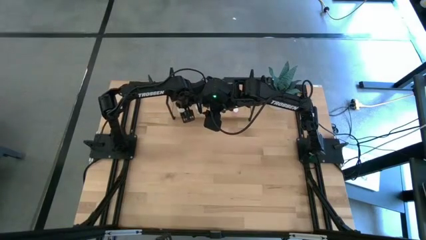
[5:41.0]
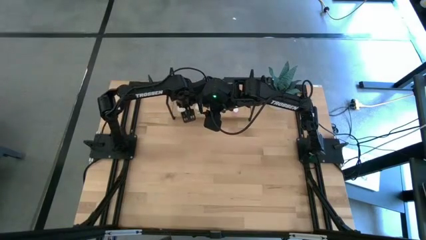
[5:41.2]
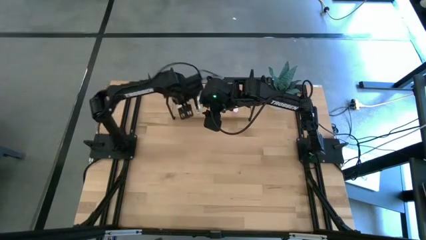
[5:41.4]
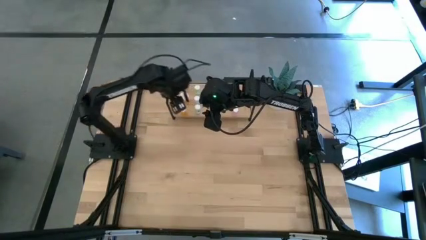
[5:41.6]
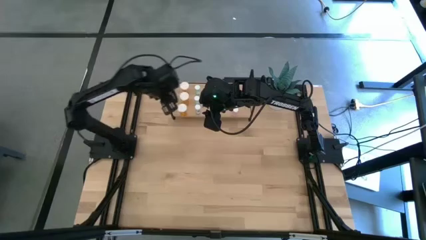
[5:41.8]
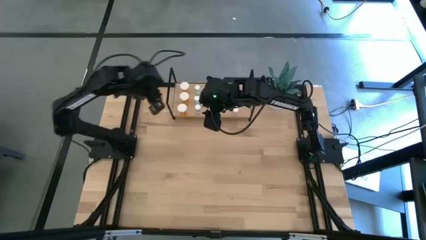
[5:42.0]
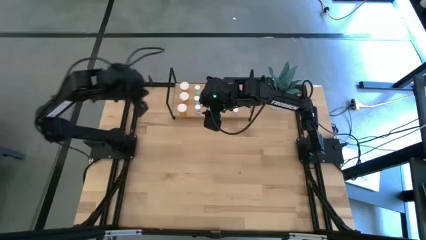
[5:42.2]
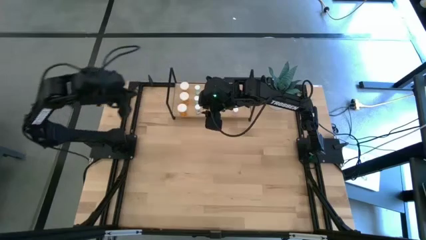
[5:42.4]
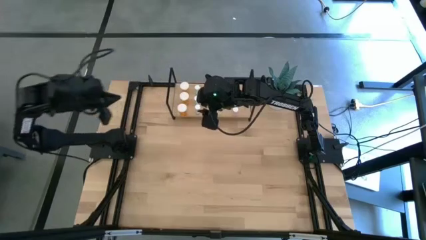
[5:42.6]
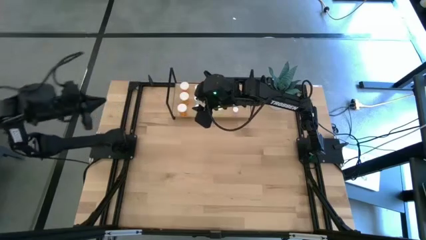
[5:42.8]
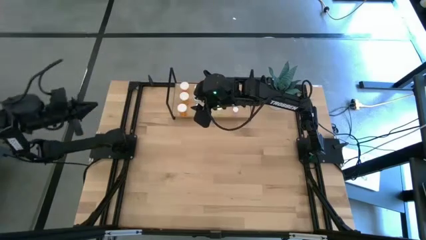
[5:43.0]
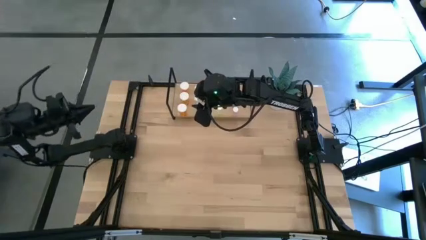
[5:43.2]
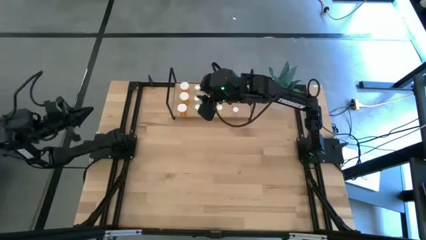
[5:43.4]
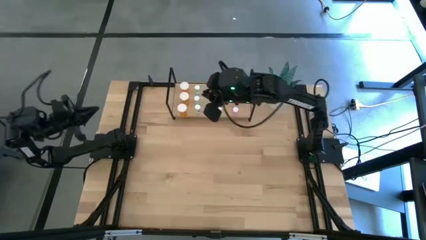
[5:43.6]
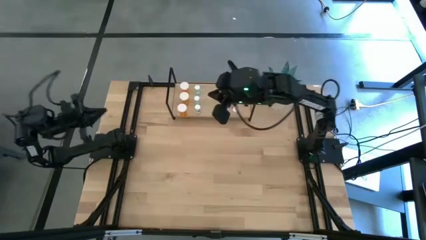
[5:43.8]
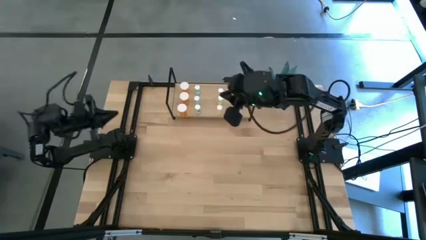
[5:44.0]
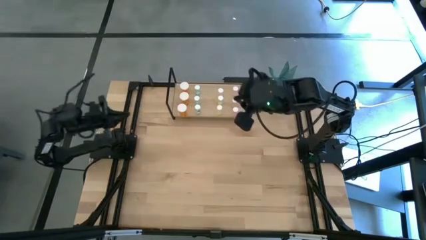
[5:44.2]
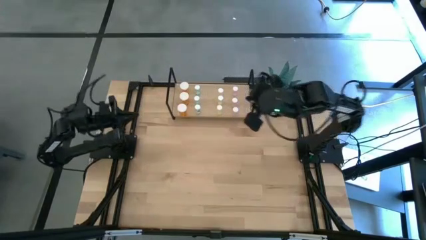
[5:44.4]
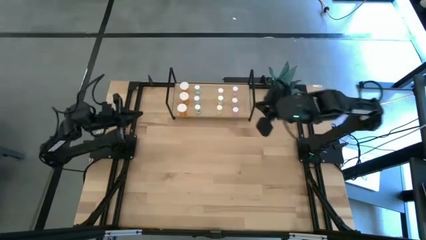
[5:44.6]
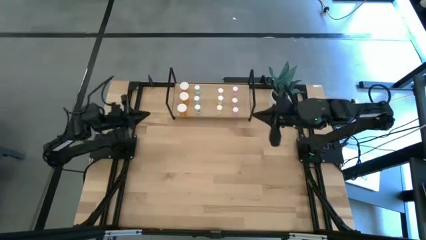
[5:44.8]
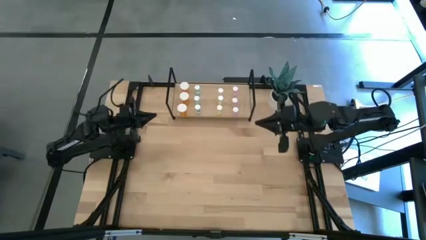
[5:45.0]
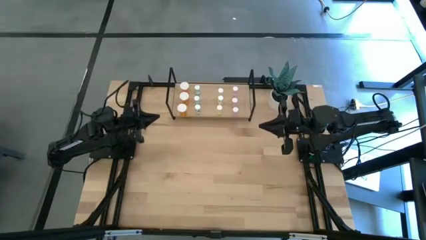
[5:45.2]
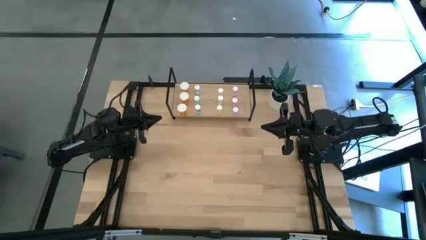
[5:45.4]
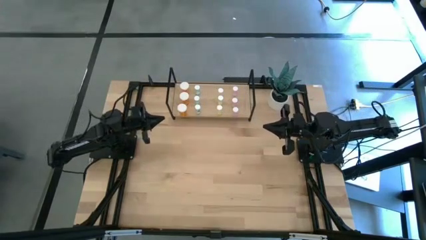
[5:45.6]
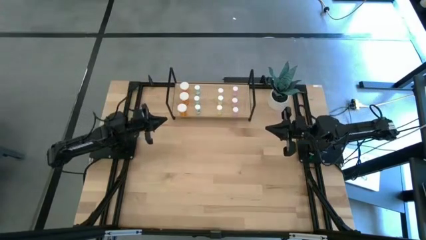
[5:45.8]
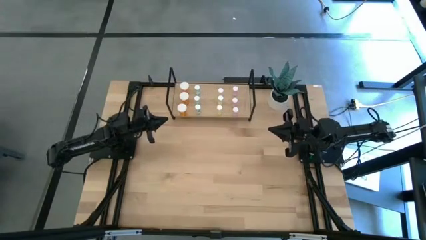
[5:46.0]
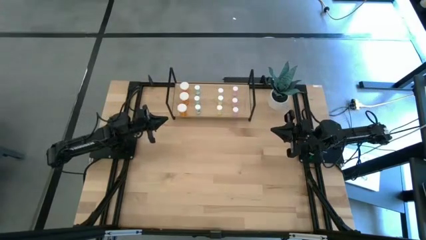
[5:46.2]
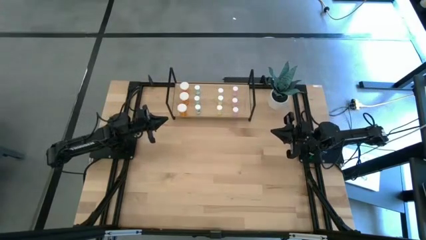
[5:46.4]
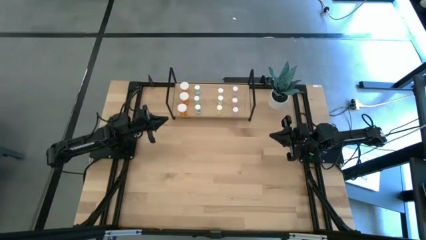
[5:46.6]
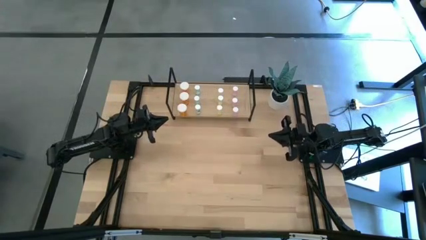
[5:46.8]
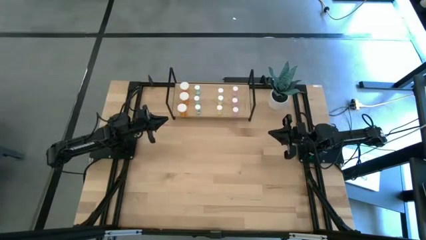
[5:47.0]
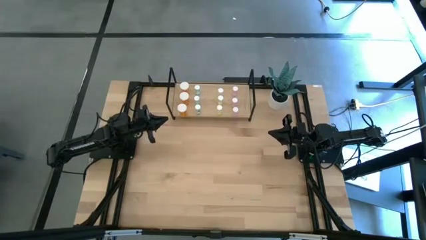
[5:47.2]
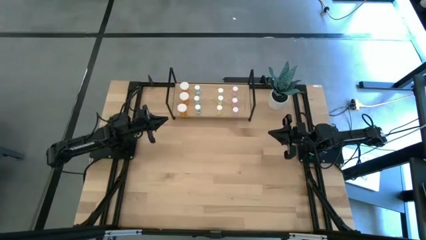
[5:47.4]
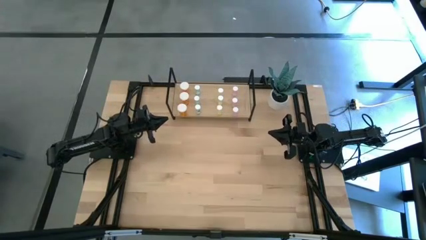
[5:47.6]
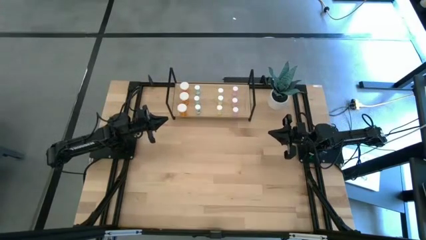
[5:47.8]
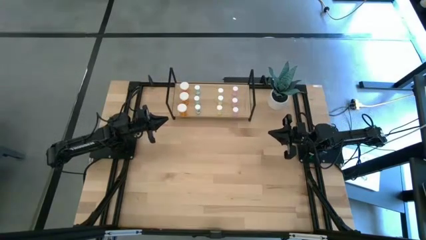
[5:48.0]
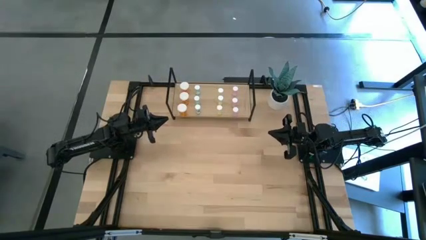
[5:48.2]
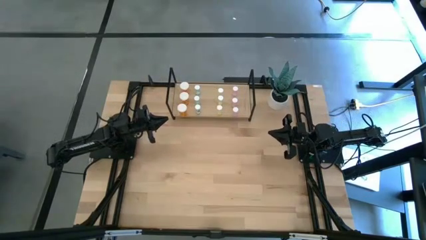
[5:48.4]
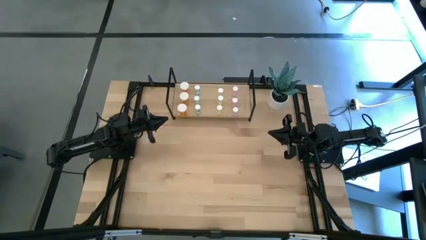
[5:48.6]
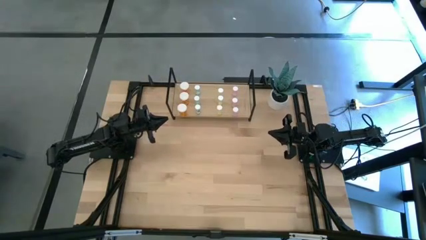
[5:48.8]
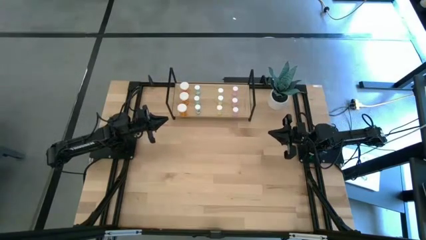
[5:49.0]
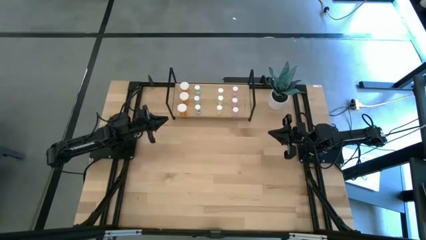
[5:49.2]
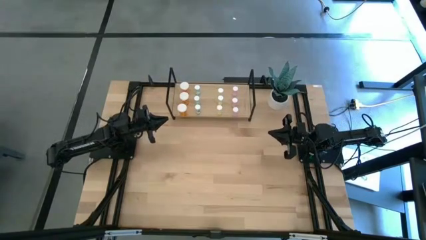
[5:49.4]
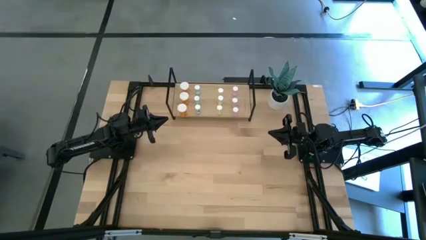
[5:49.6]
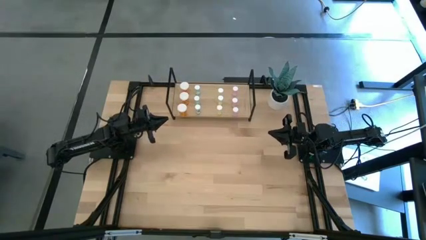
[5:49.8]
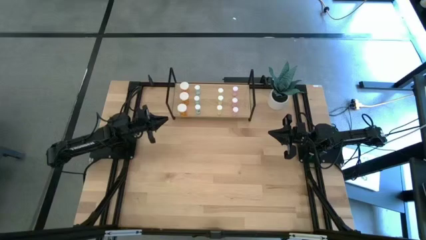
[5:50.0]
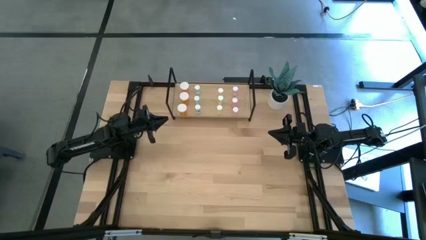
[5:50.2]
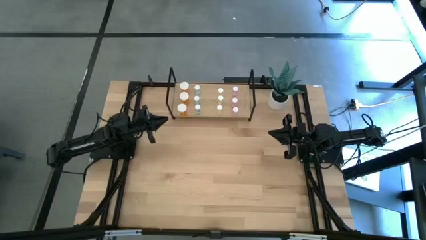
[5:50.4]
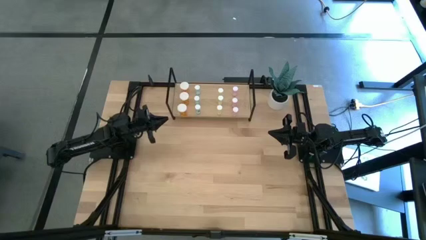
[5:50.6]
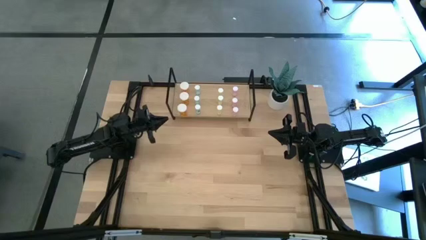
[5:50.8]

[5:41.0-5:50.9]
Task: Pick and place medicine bottles onto shelf by color
Return to Home Position
